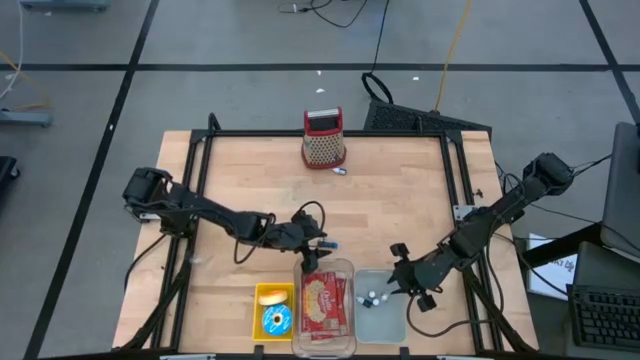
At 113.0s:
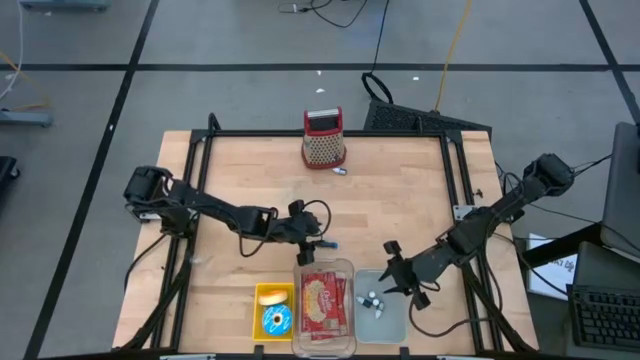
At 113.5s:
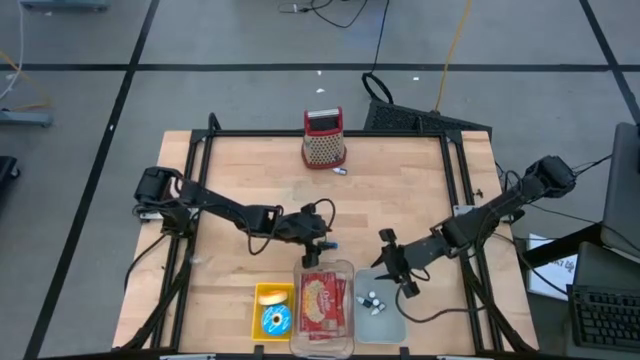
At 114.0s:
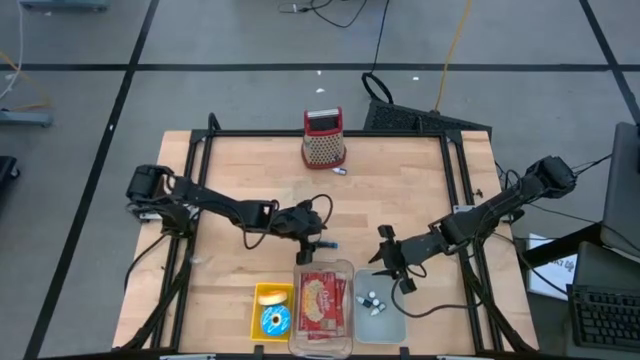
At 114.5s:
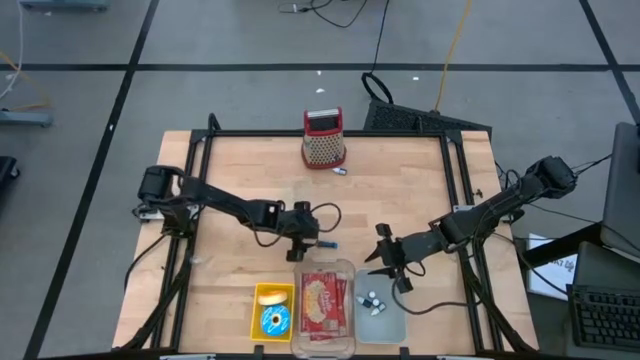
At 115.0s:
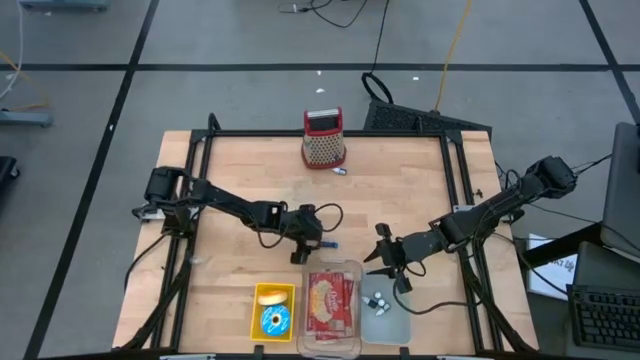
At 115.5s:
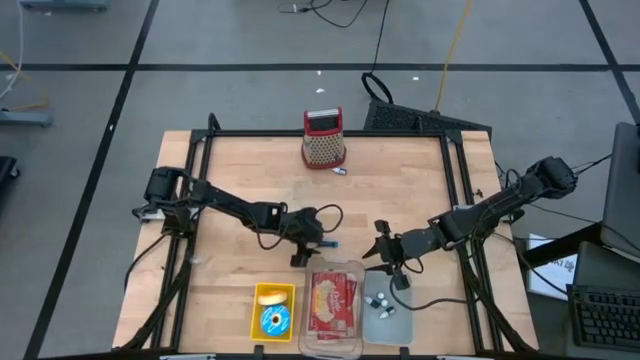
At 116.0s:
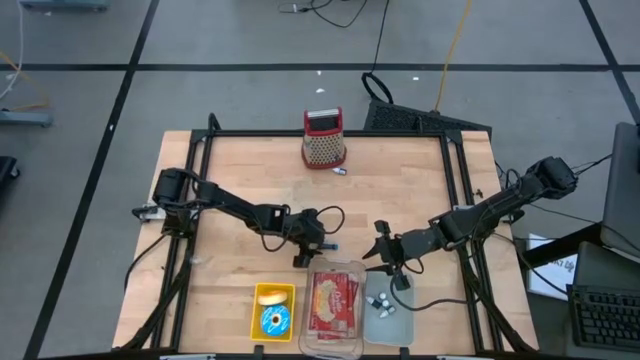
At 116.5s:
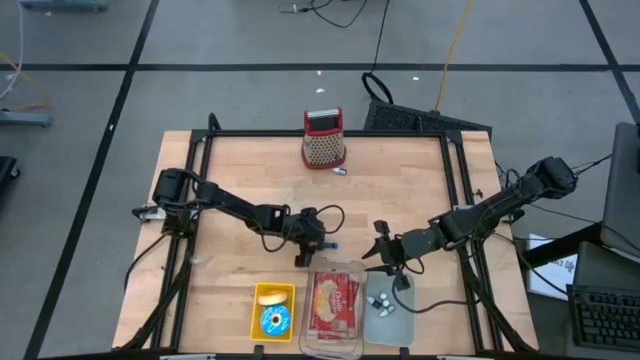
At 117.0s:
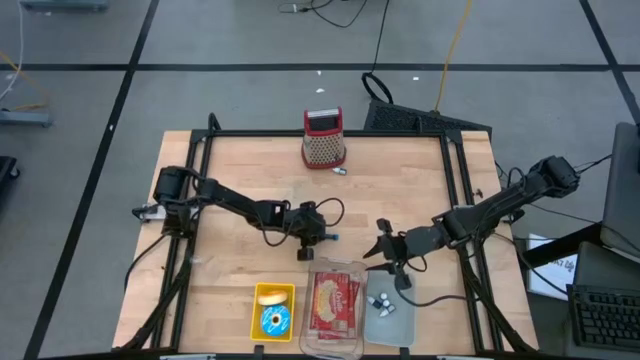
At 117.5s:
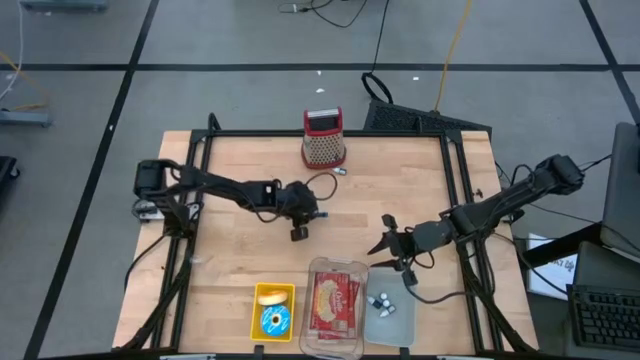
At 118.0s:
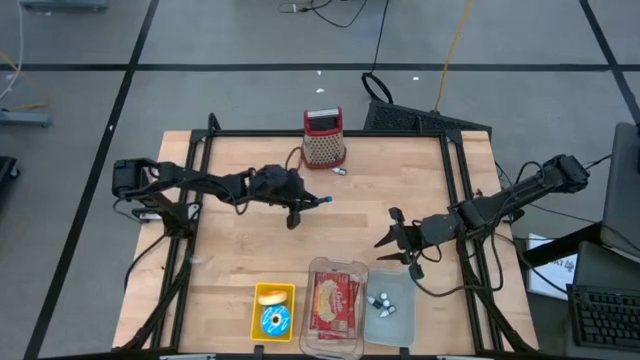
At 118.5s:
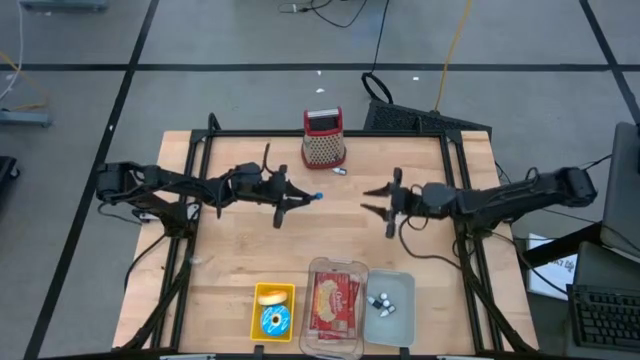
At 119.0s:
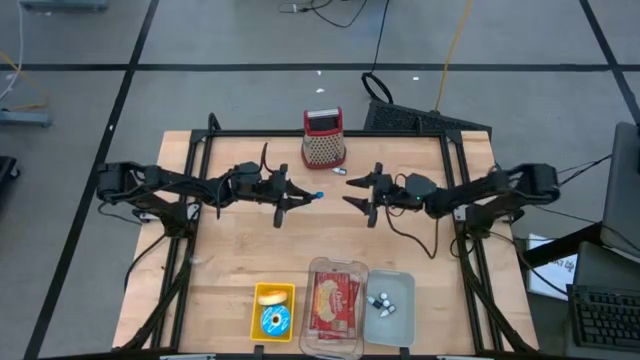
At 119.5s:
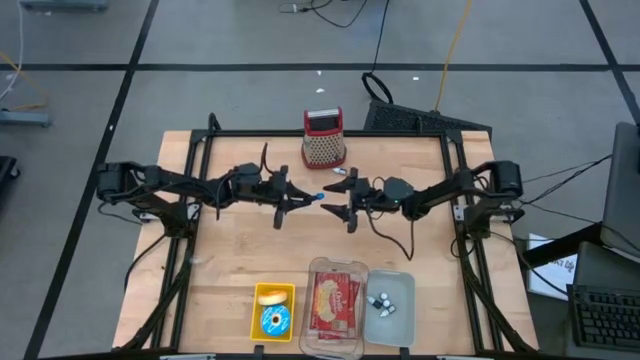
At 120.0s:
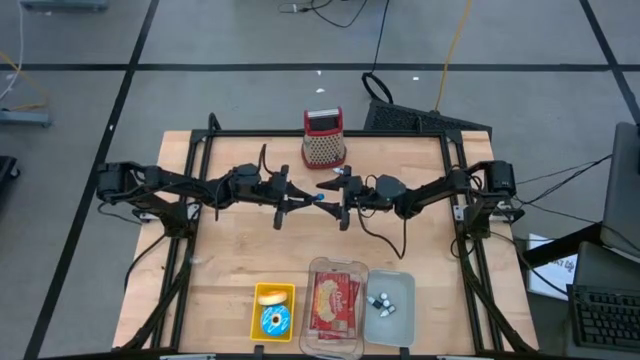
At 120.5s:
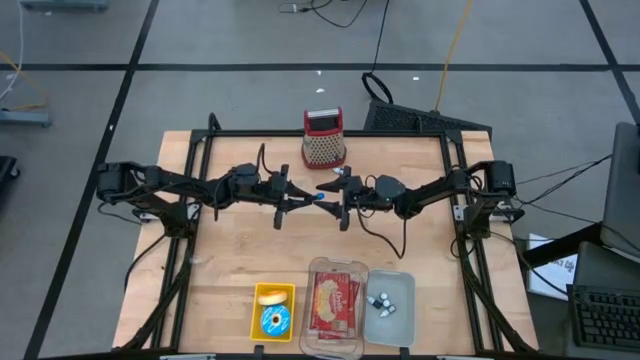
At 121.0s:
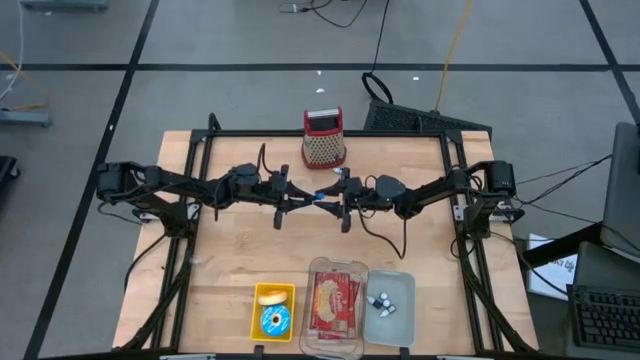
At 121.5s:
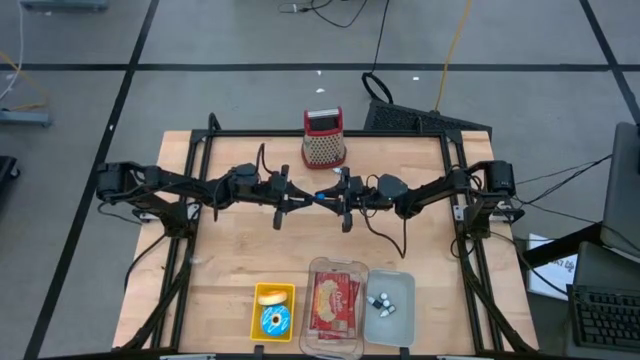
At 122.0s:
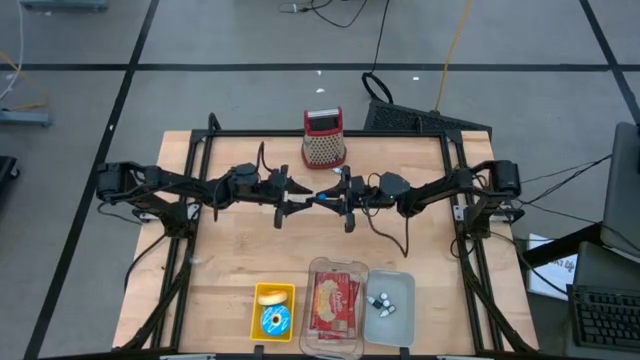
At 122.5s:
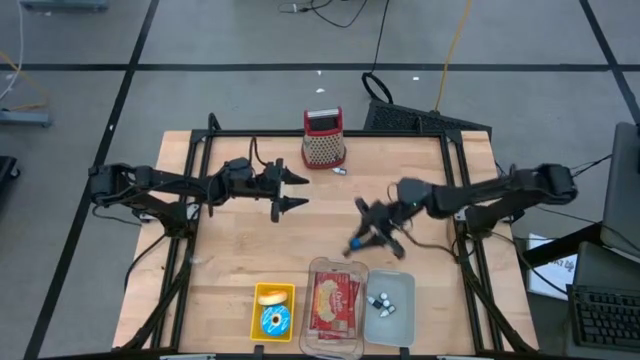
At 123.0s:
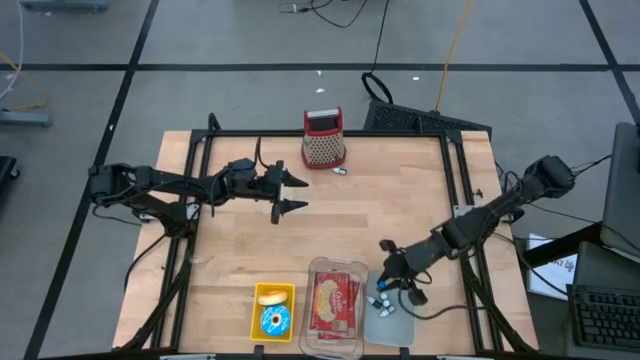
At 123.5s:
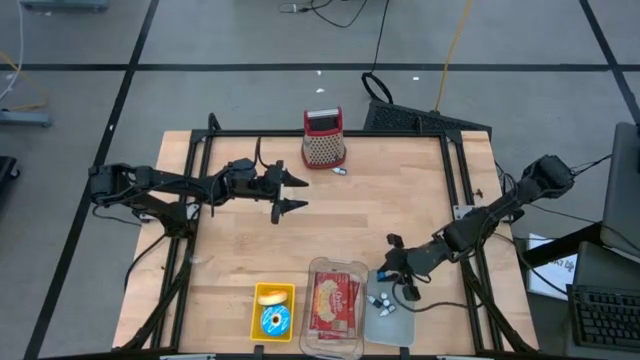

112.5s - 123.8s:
Put the blue food coloring bottle into the gray bin

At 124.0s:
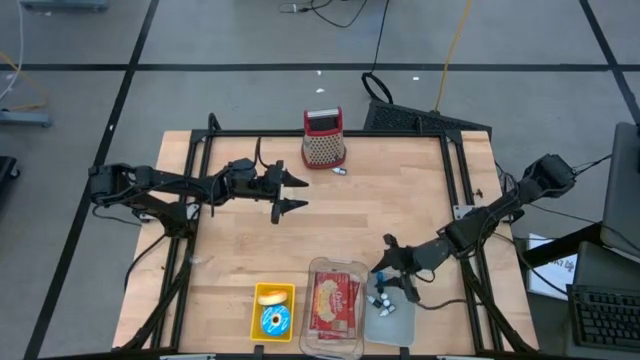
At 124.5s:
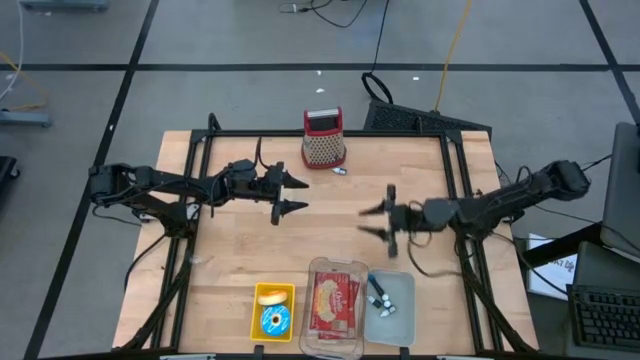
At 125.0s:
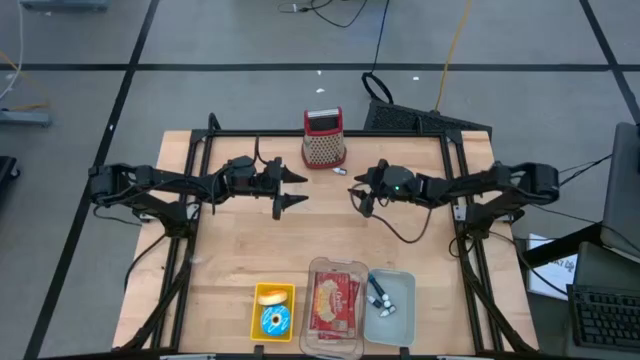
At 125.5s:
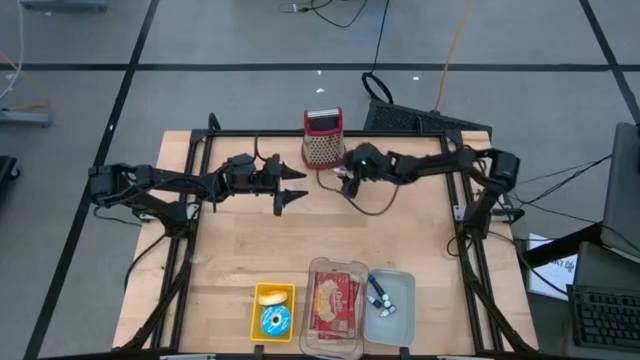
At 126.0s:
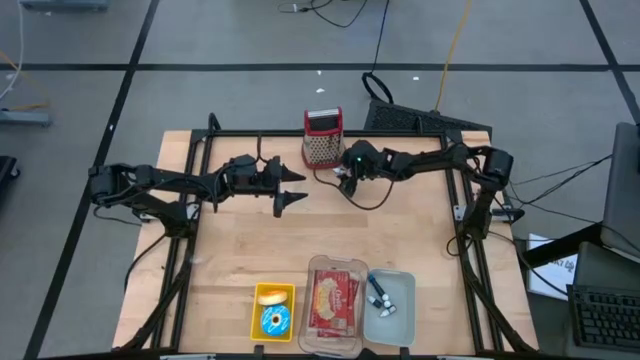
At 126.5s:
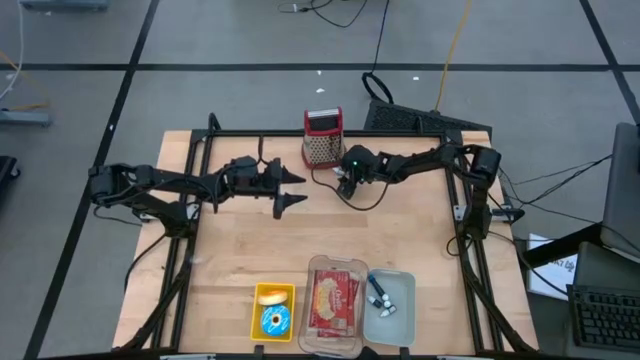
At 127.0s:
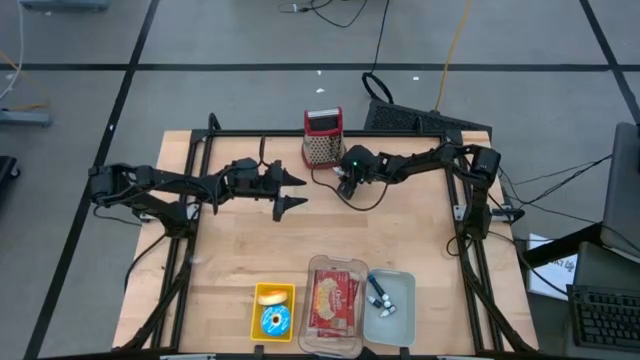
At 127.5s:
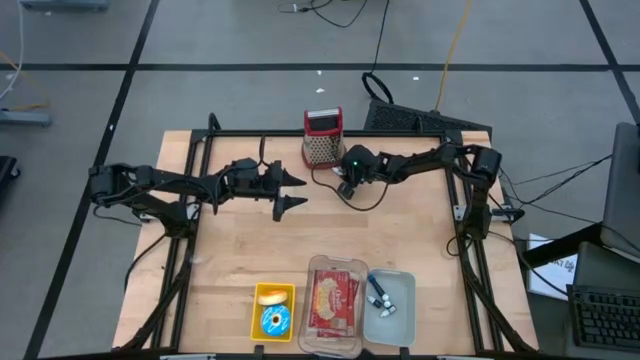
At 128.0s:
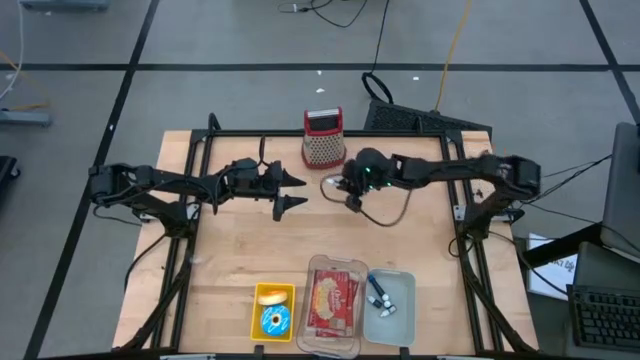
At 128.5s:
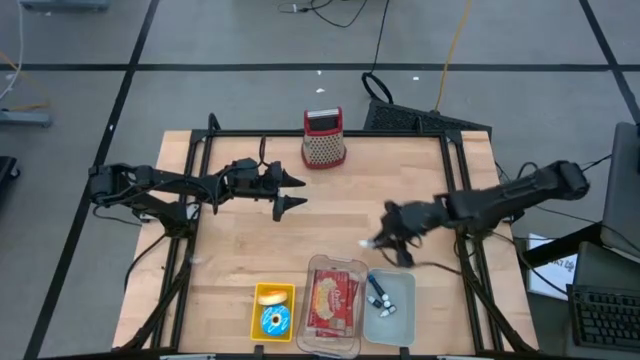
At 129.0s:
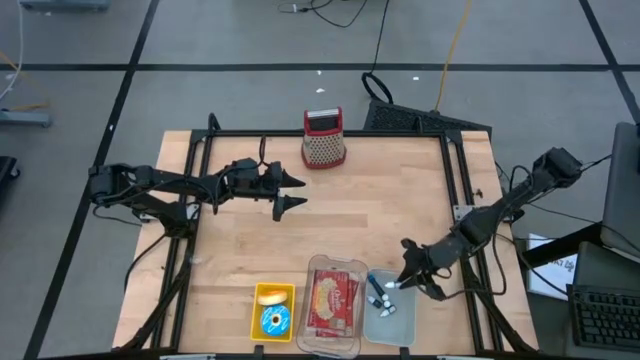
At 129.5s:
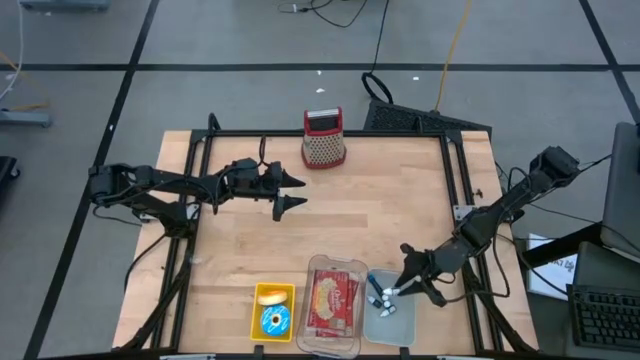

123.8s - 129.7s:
Put the black food coloring bottle into the gray bin

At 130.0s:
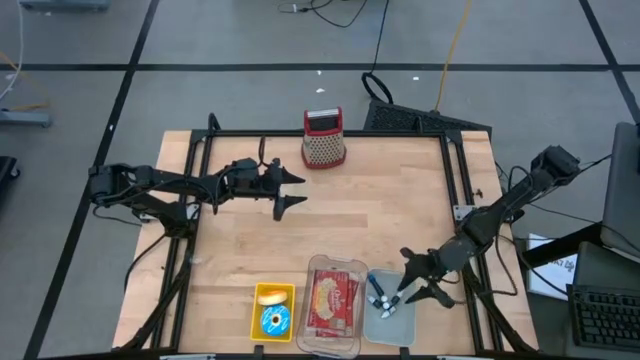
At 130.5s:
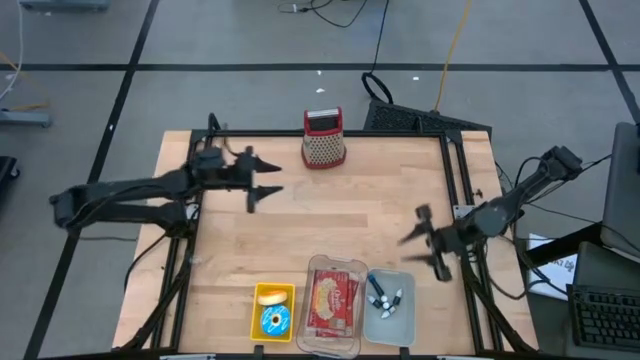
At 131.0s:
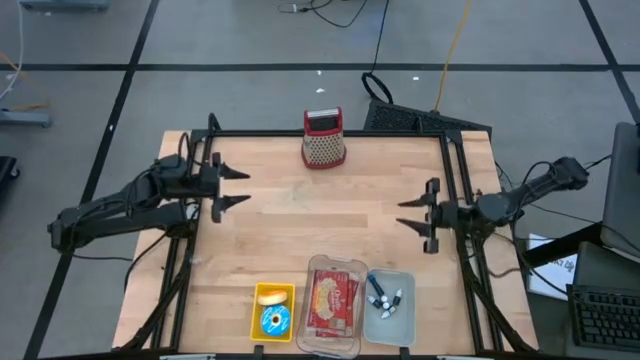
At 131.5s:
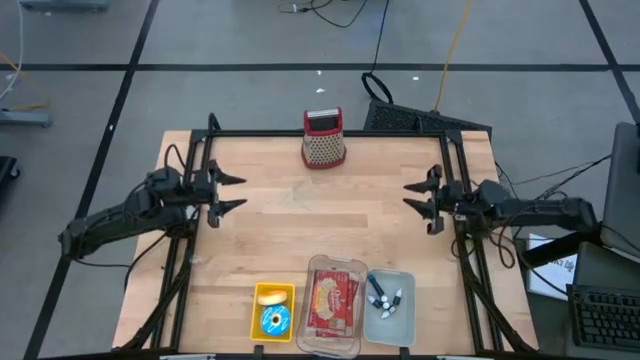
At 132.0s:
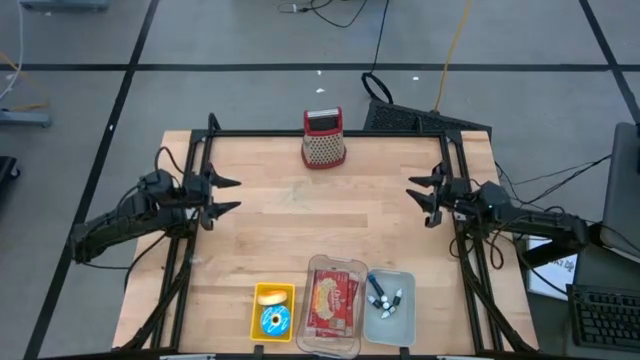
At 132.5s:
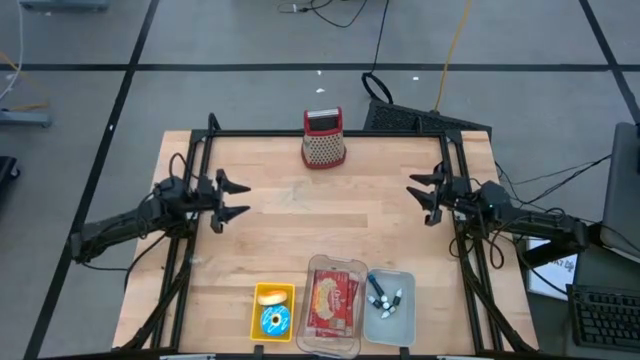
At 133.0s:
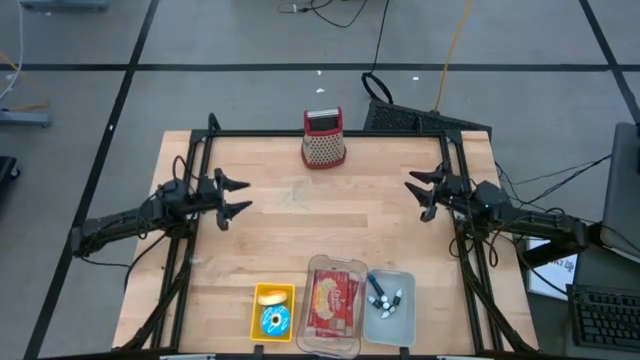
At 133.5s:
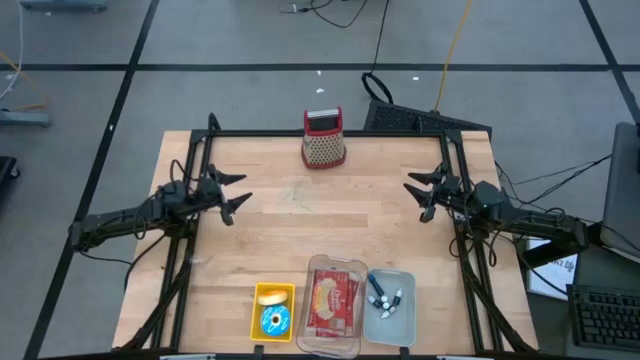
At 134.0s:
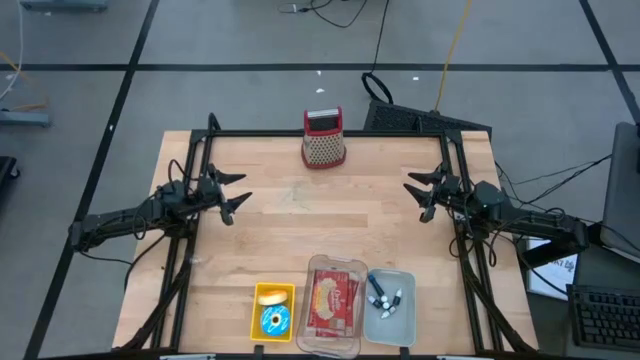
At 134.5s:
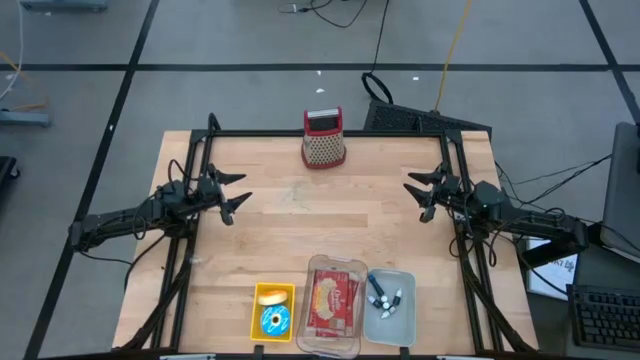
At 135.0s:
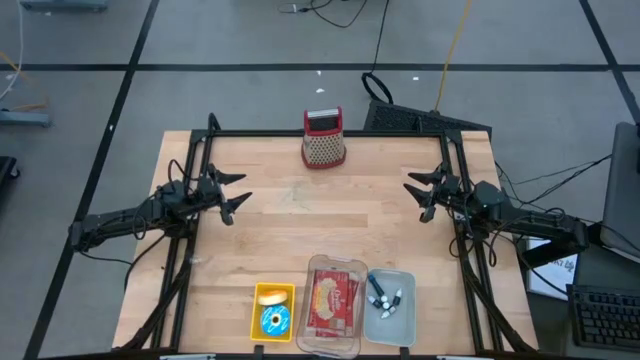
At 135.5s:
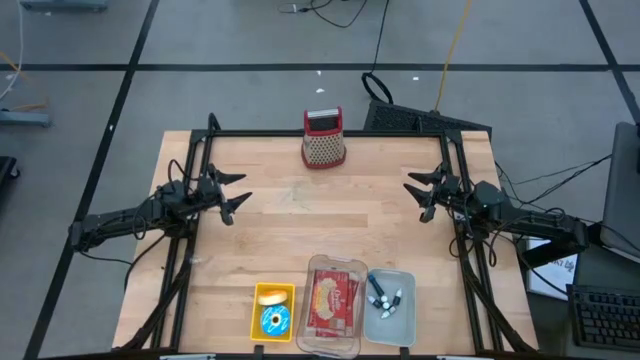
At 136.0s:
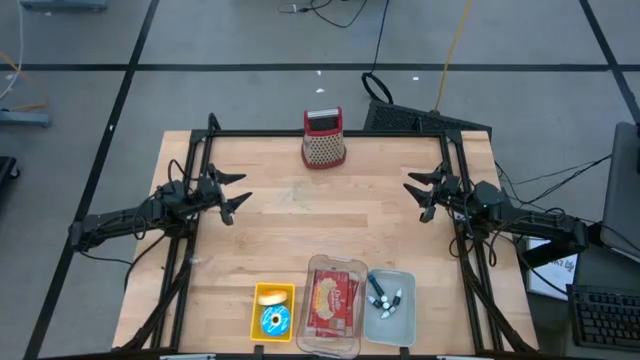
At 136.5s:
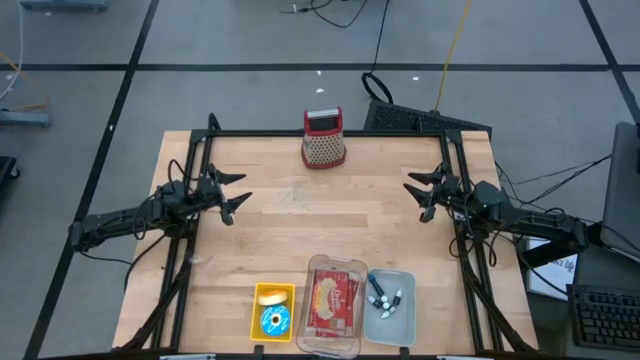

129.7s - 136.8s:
Return to Home Position
